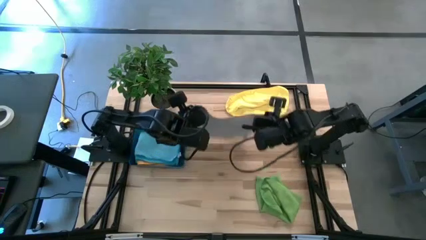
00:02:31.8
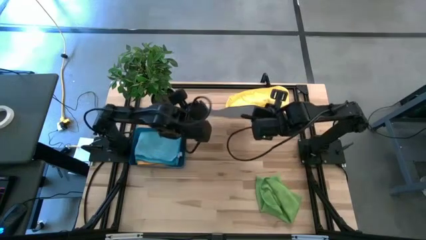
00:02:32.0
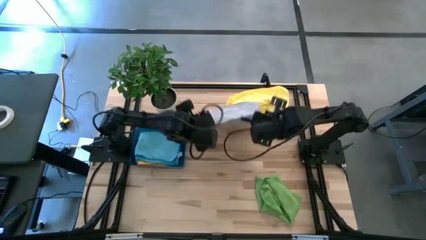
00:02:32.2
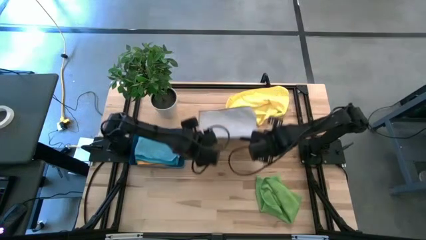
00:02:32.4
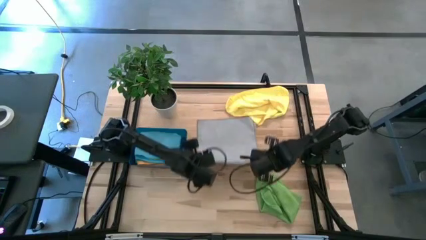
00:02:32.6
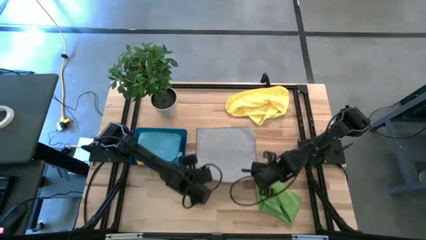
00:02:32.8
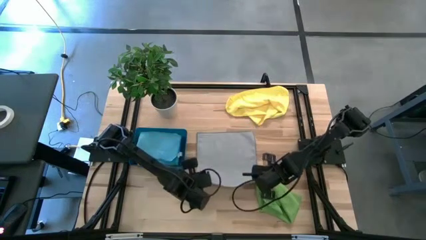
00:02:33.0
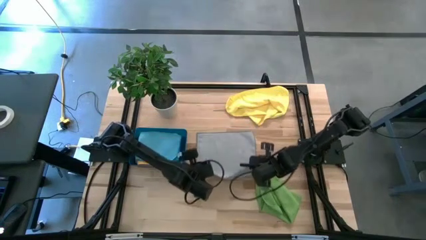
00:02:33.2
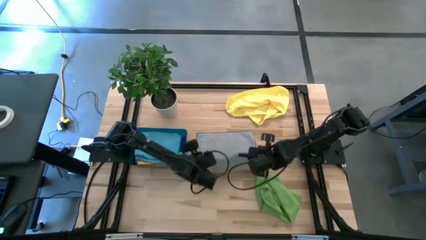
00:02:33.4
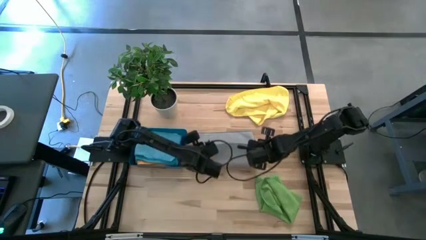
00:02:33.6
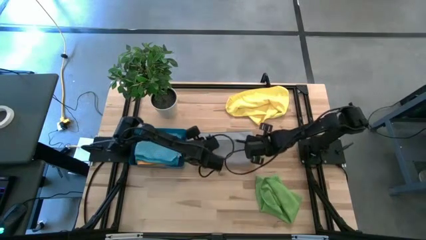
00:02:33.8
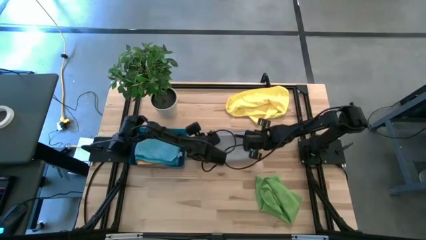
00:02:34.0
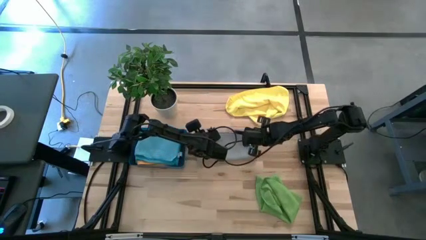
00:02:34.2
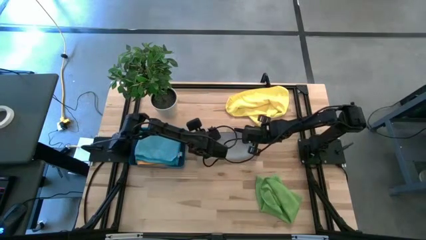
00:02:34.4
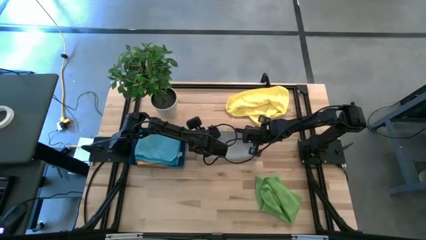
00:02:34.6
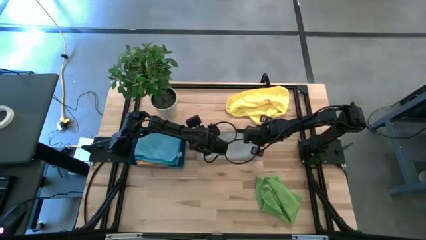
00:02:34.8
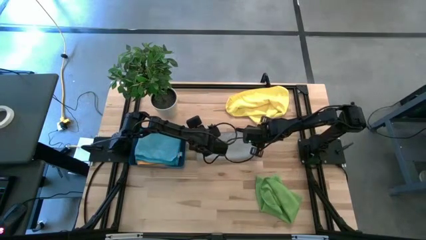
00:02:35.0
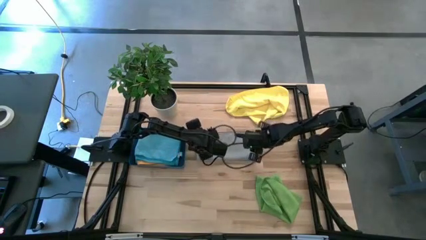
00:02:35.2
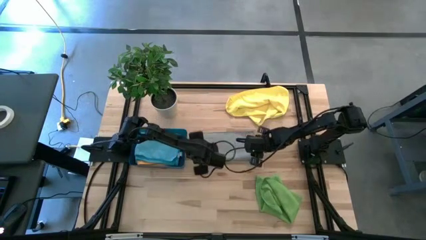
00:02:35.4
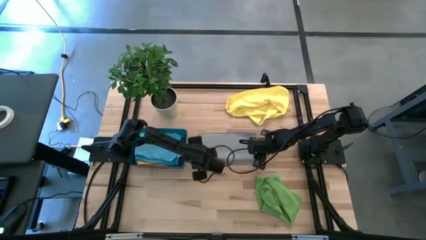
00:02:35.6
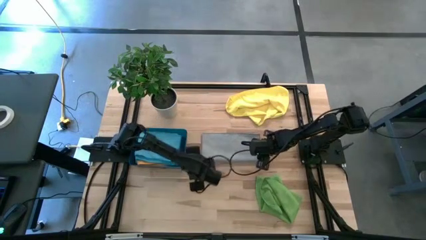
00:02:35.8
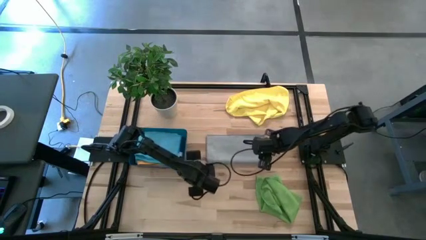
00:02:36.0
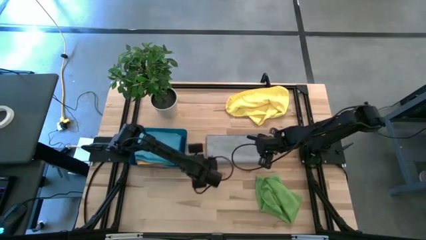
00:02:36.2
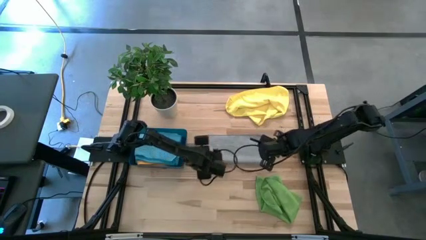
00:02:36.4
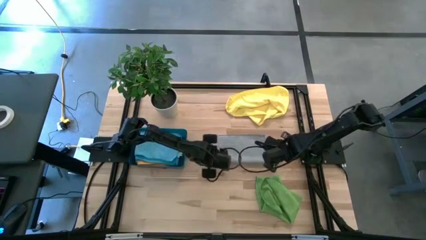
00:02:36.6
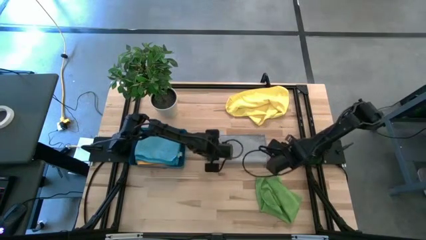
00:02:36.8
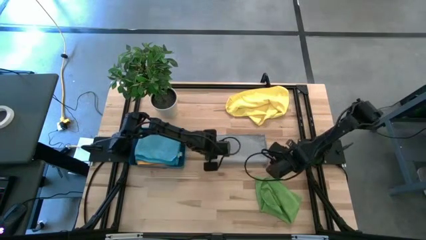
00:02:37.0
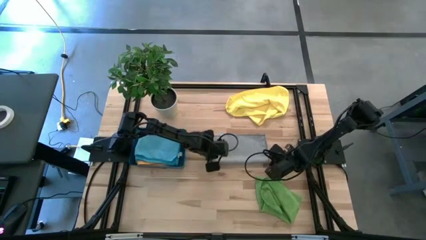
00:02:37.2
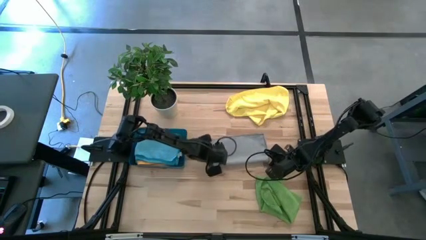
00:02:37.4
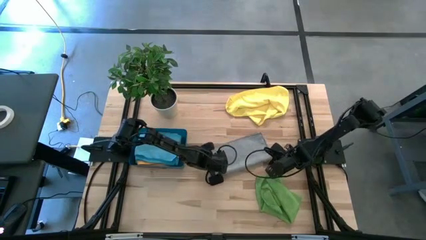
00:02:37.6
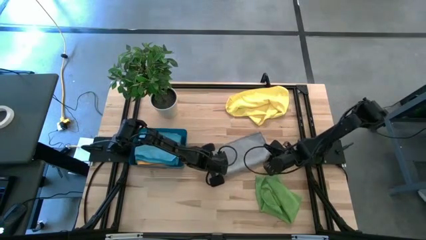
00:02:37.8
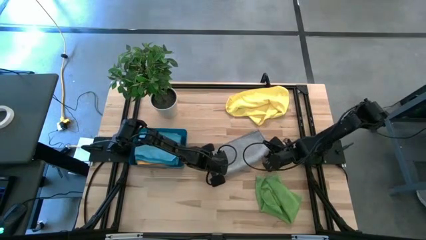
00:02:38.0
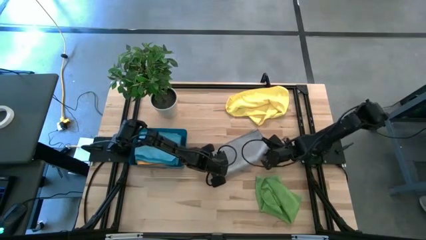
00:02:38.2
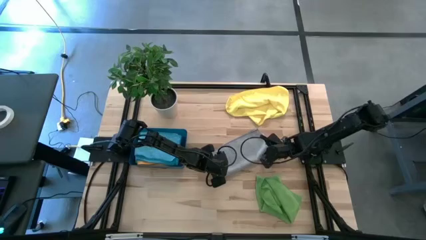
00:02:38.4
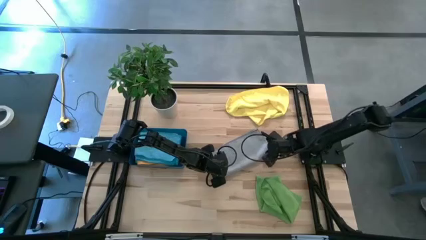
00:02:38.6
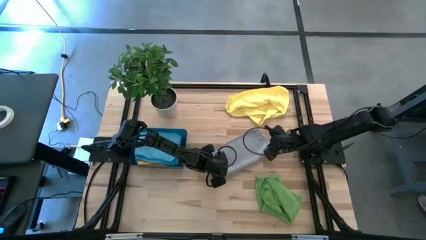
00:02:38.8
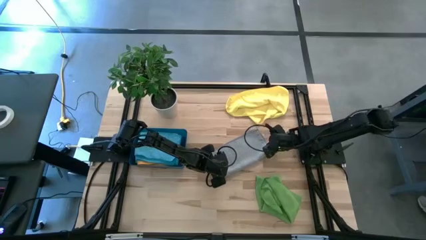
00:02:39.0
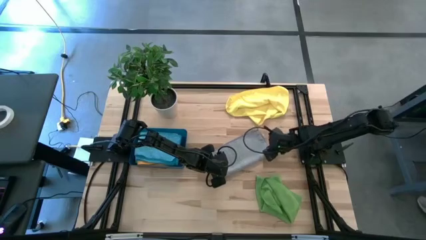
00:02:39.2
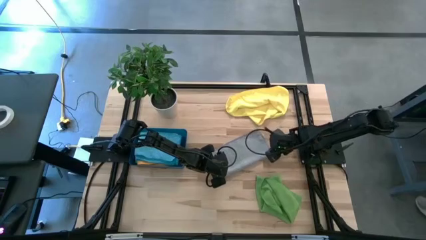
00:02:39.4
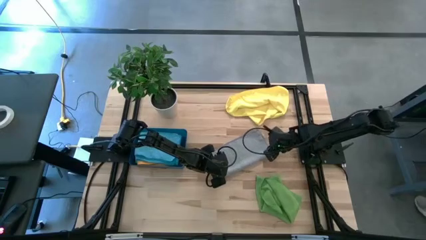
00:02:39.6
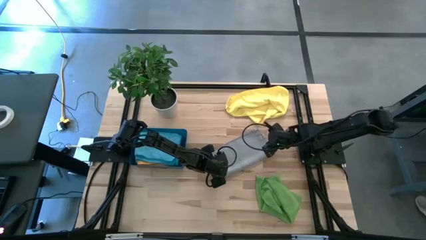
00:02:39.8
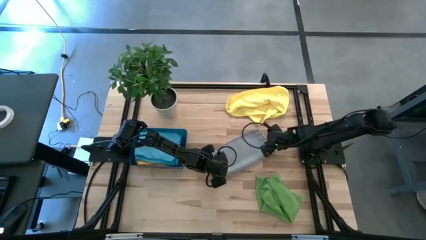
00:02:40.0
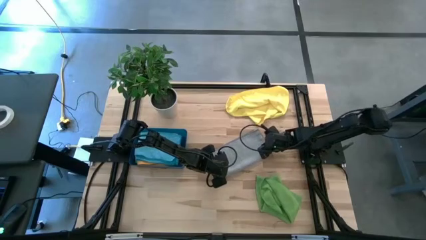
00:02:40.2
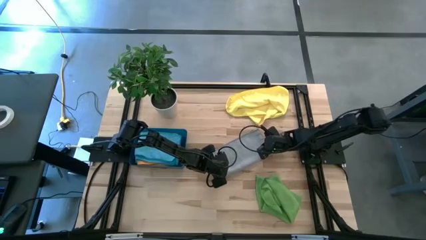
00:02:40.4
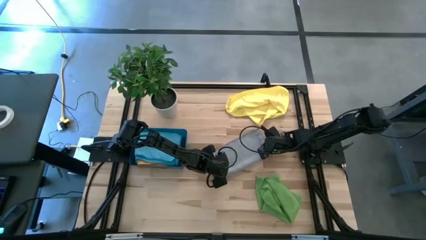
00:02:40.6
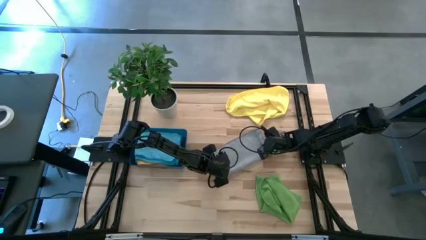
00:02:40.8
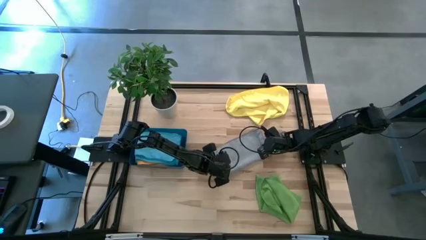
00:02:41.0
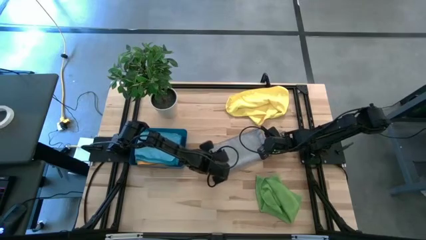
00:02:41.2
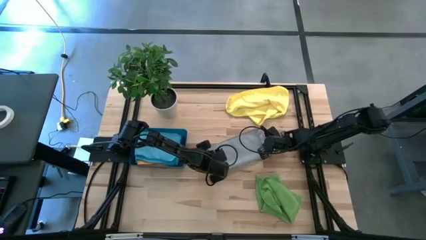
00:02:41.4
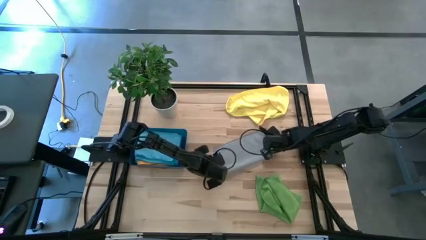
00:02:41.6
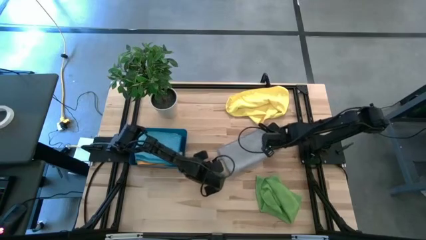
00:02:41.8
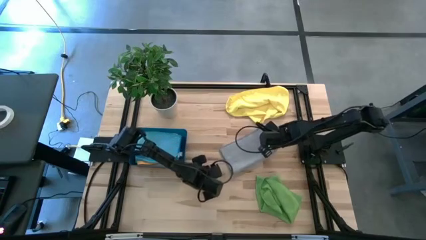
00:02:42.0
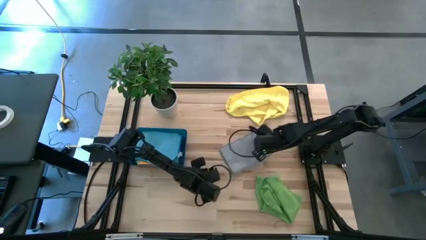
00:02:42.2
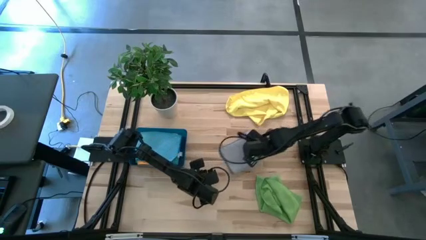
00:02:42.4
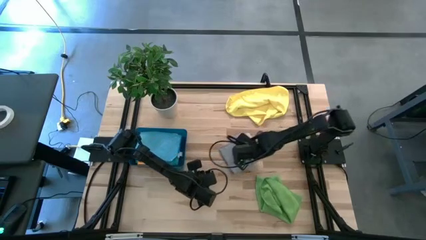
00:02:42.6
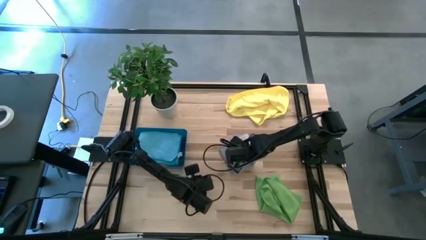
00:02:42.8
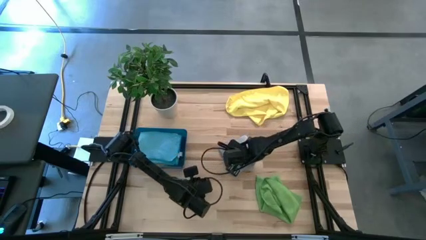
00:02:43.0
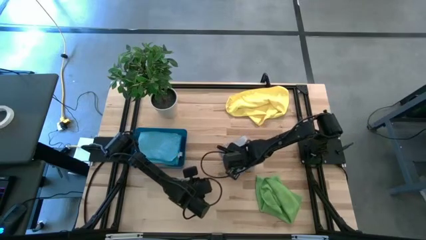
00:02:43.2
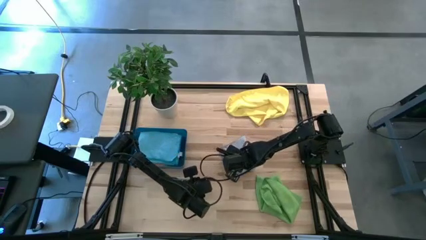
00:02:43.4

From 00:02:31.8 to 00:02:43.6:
Task: Fold microfiber towels
Fold the gray towel on the table

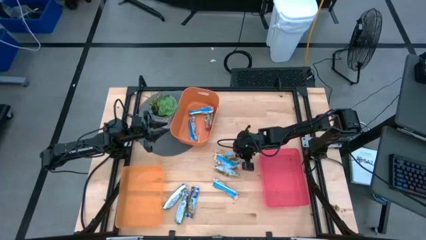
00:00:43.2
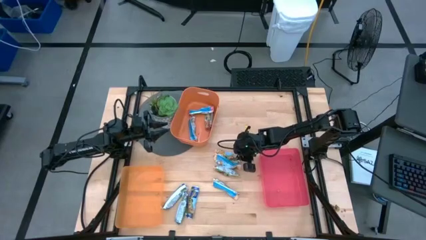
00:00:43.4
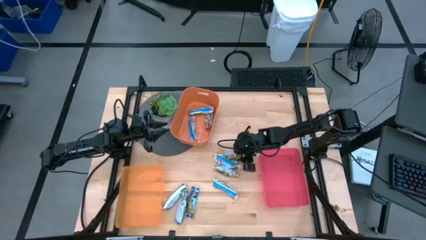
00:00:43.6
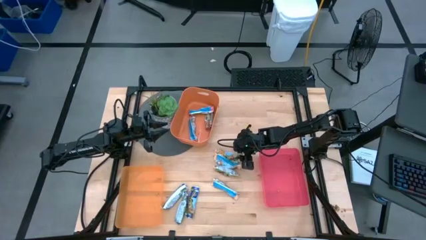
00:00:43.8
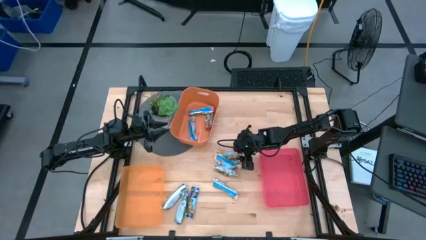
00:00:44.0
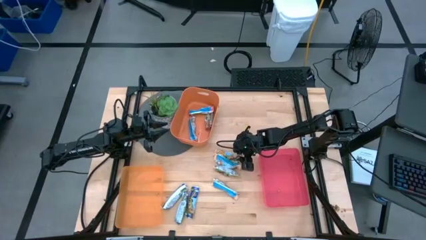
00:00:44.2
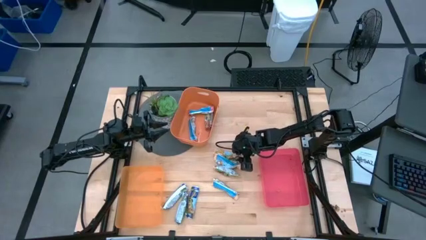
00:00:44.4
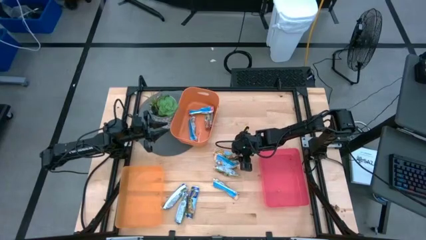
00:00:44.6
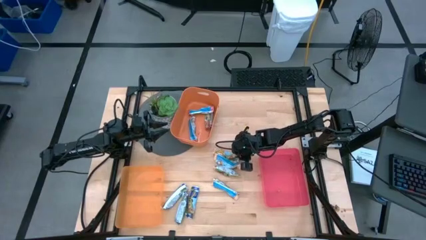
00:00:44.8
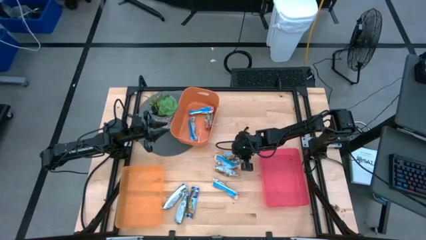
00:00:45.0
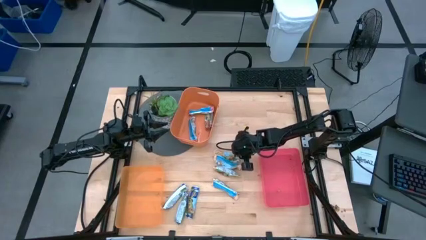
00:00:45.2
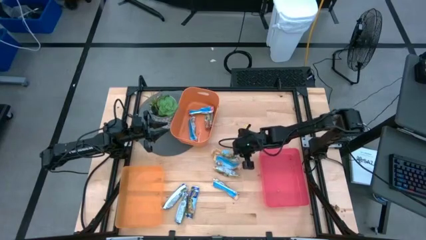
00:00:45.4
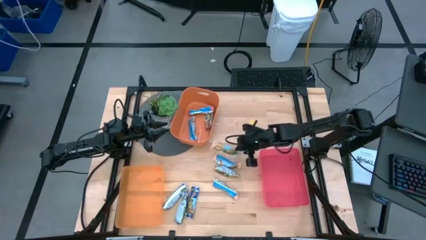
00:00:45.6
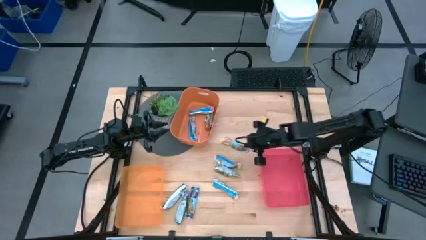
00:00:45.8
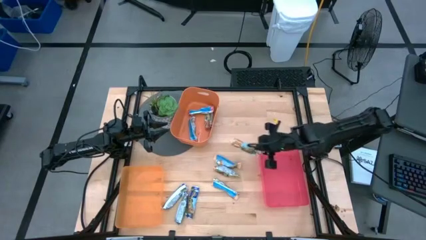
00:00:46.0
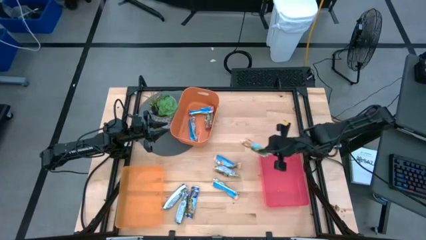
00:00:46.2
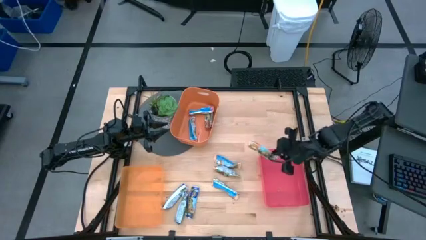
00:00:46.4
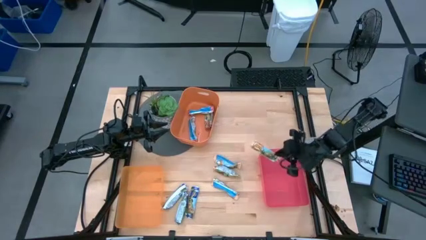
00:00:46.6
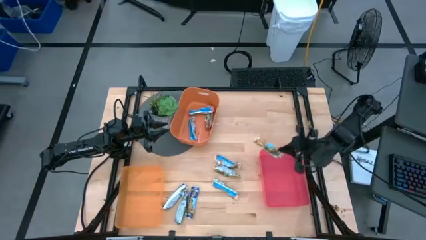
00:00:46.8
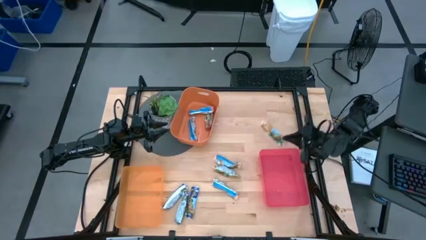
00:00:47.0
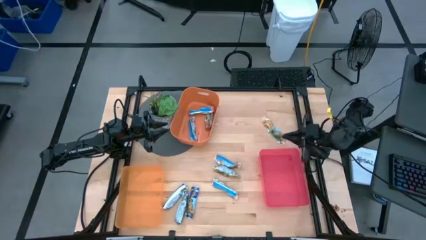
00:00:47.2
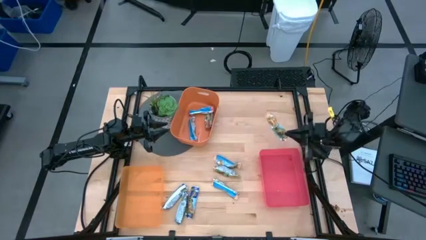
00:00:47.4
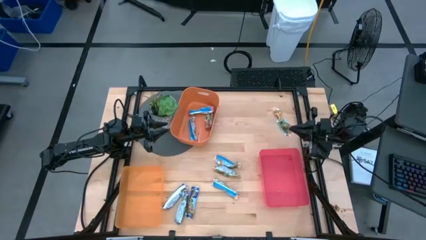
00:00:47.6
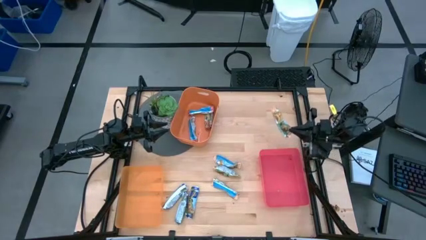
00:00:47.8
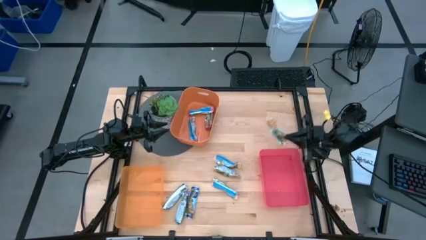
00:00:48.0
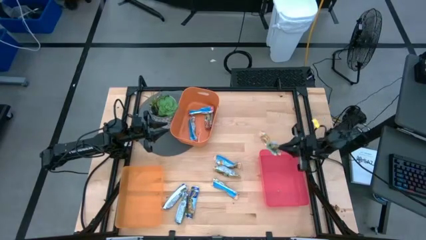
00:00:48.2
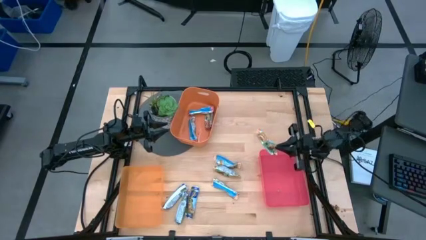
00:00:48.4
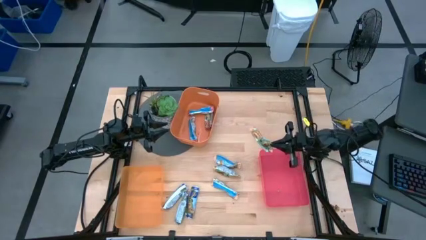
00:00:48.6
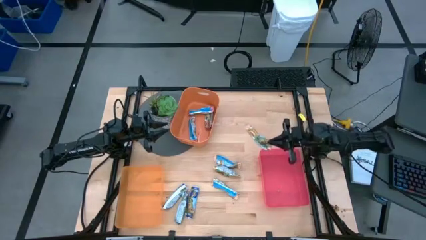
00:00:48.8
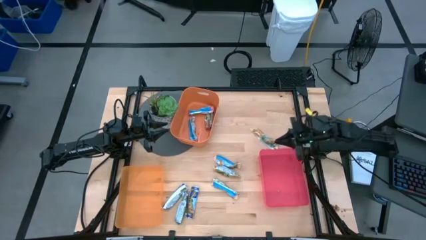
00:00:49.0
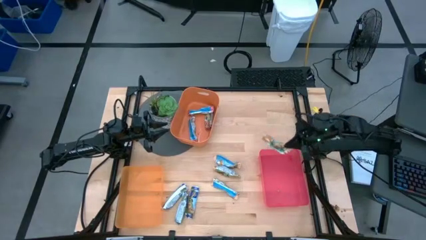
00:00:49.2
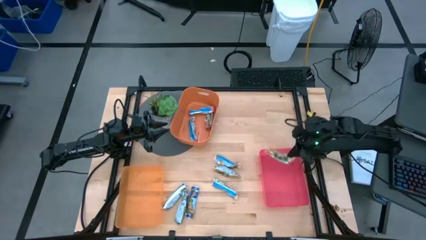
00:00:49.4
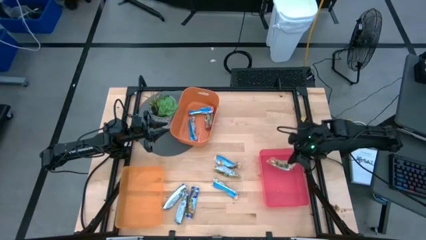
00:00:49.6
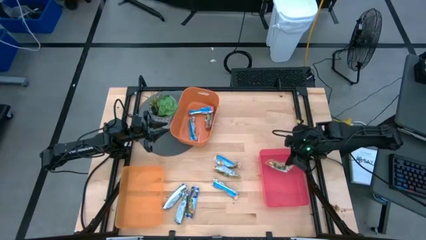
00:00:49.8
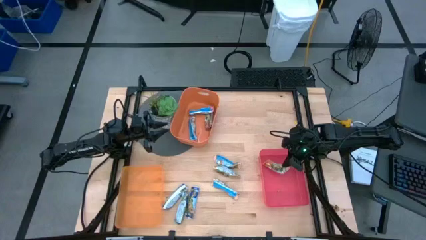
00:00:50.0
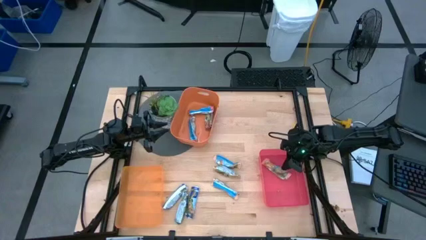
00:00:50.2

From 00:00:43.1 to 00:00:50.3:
Task: Pick and place Granola Bars by type
Put the yellow granola bar into the red bin
